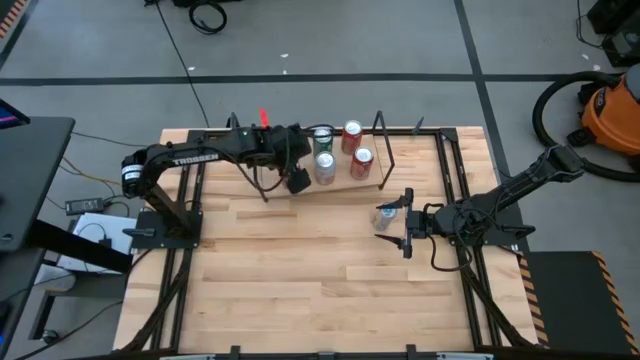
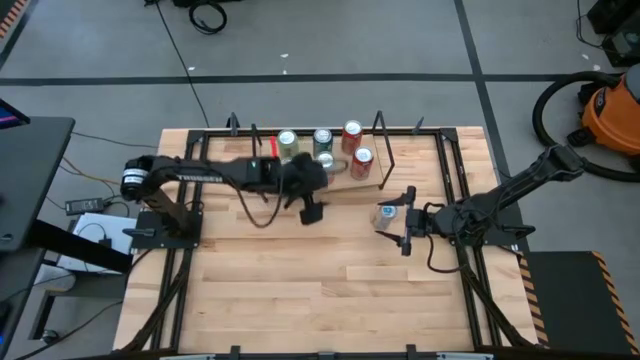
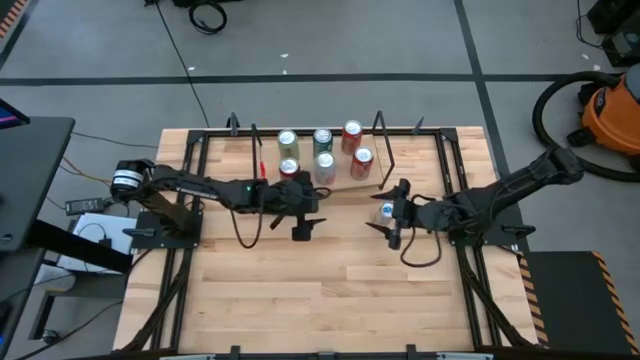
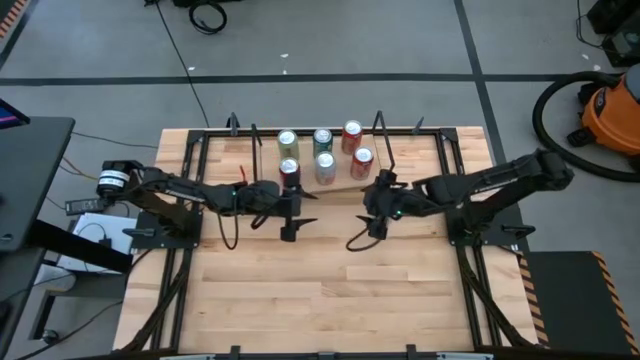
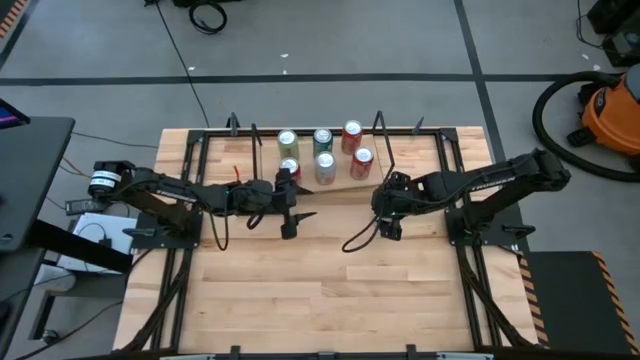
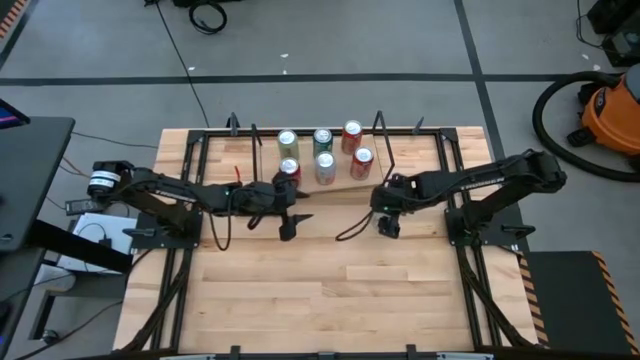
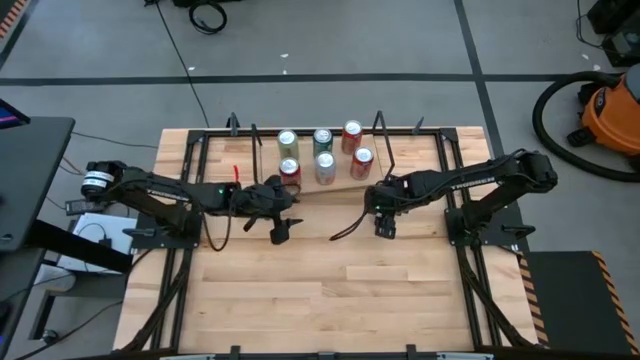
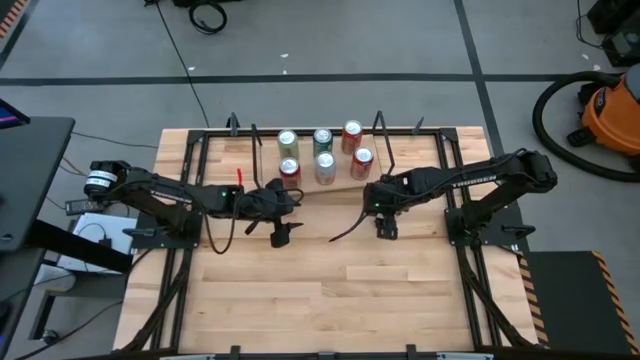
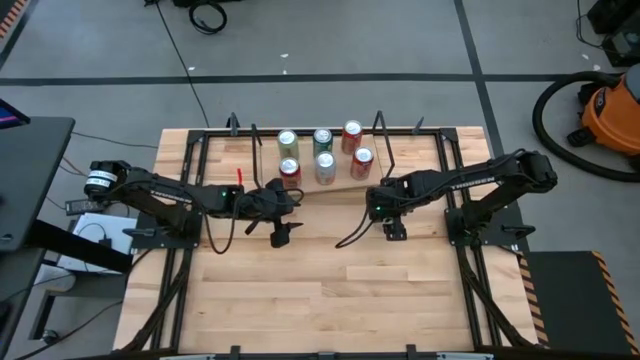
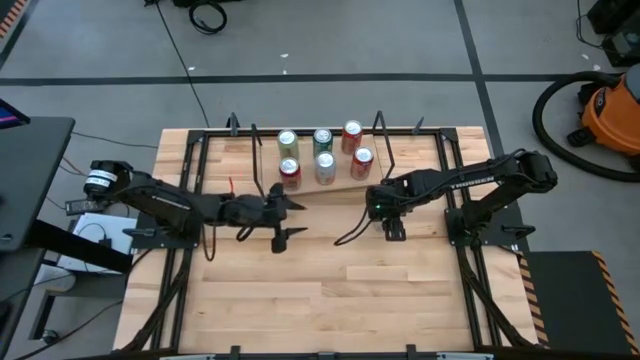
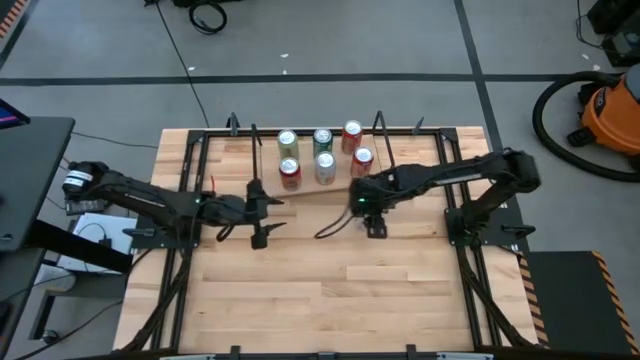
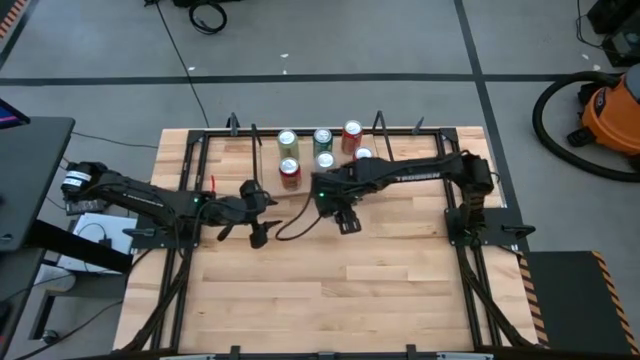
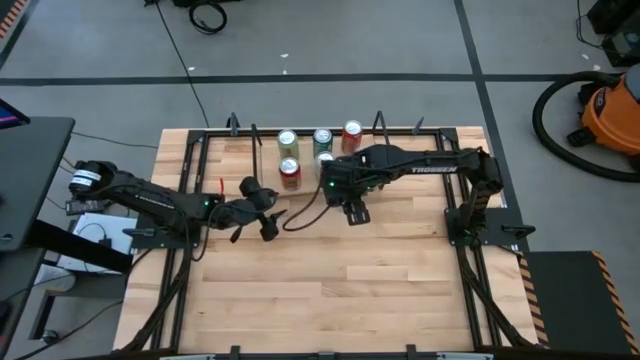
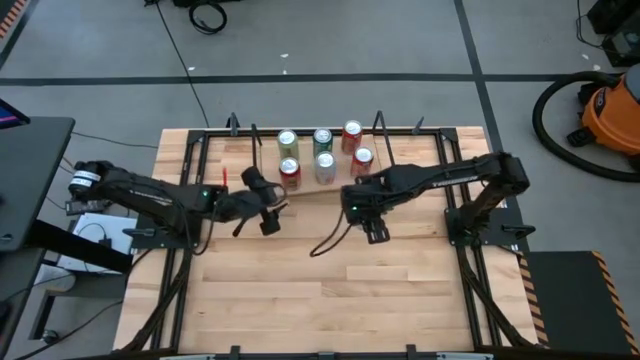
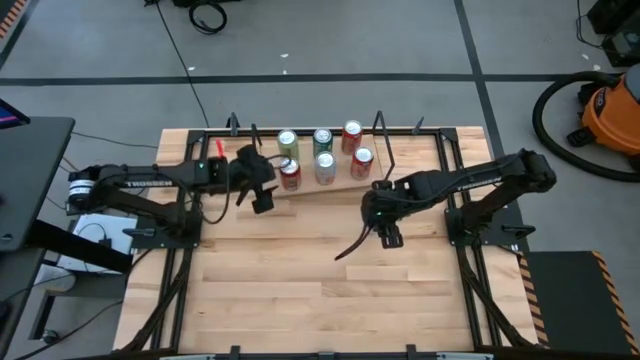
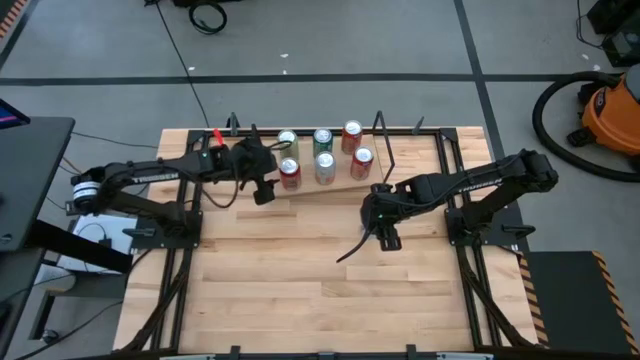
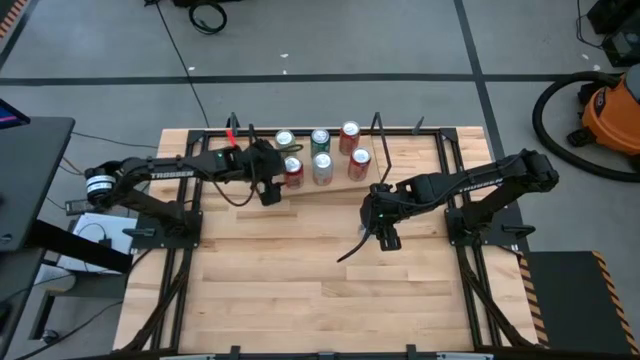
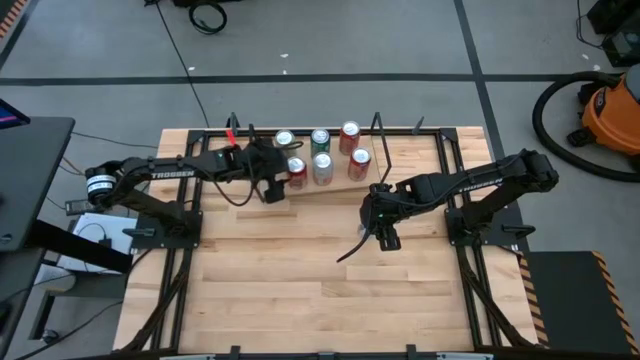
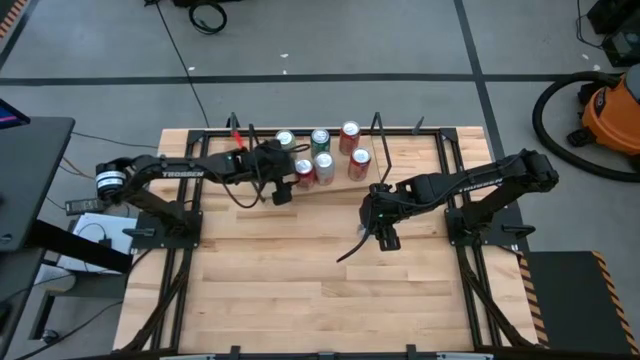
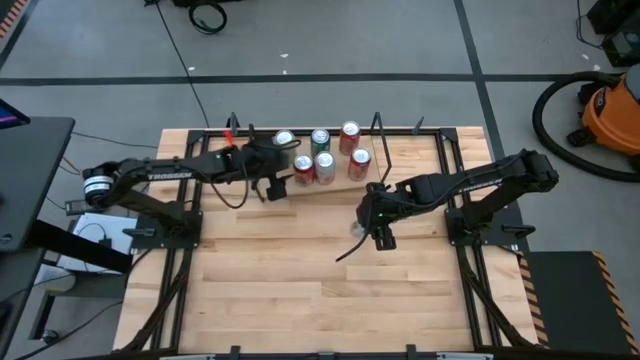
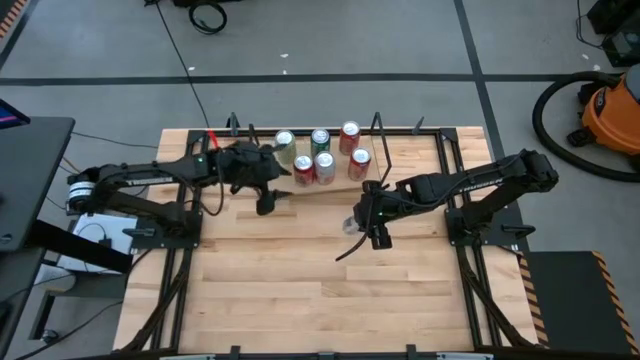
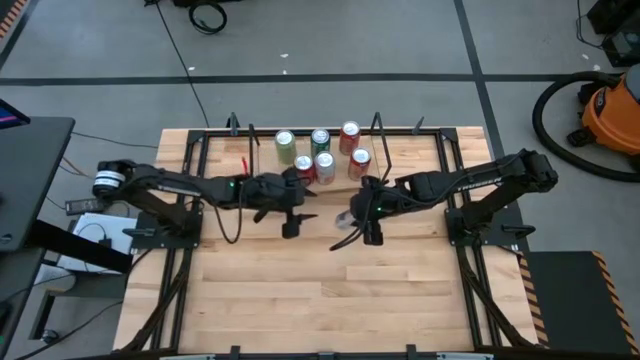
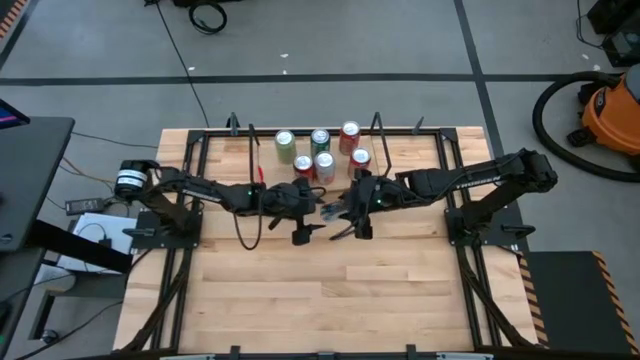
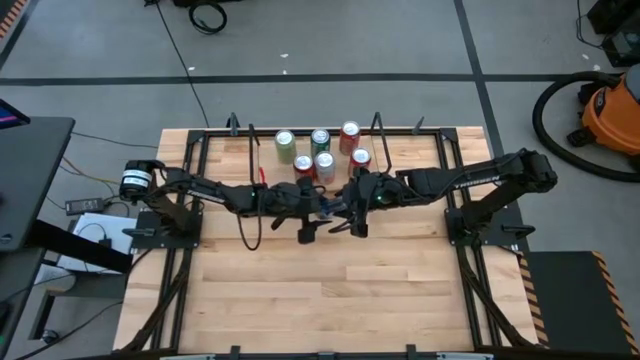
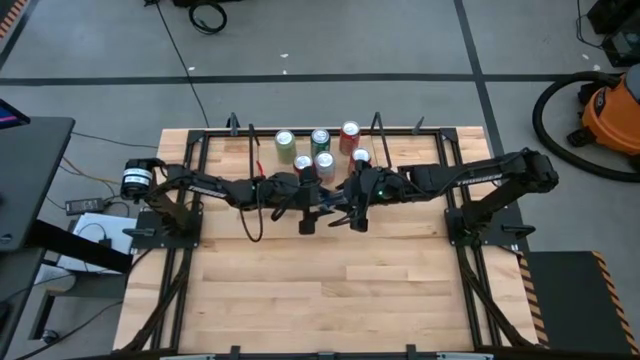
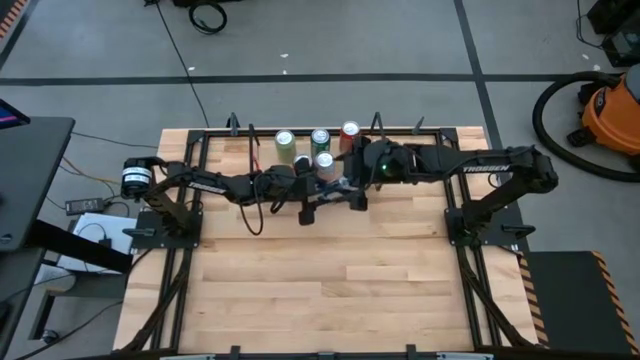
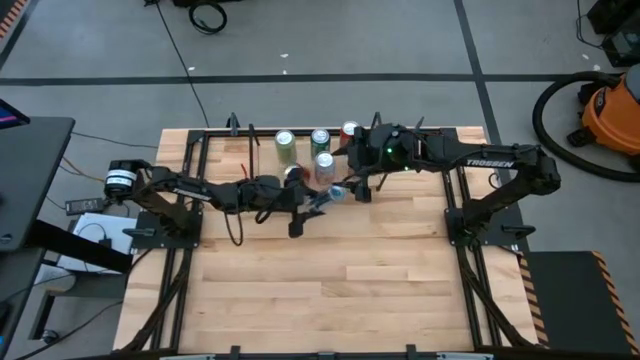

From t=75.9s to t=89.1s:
Task: Place canned beverage on shelf
Put the blue soda can on the shelf

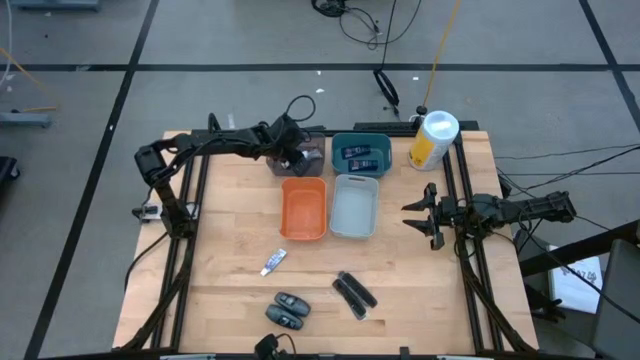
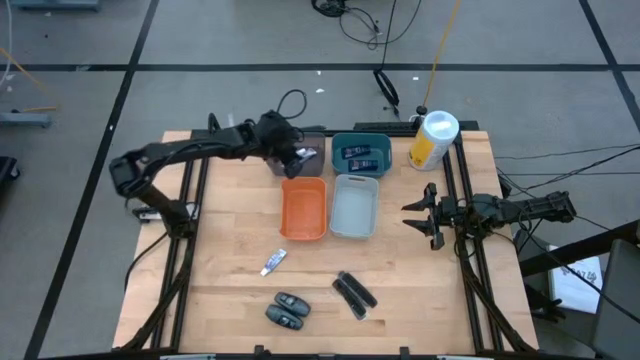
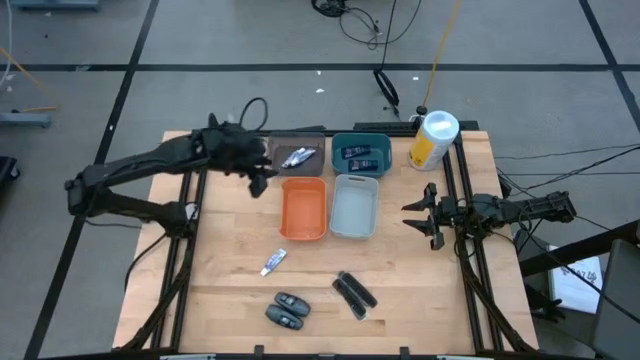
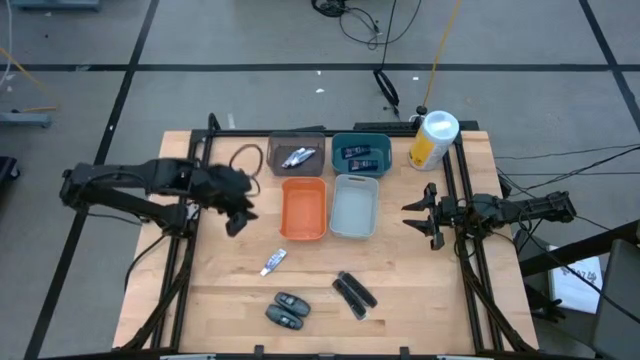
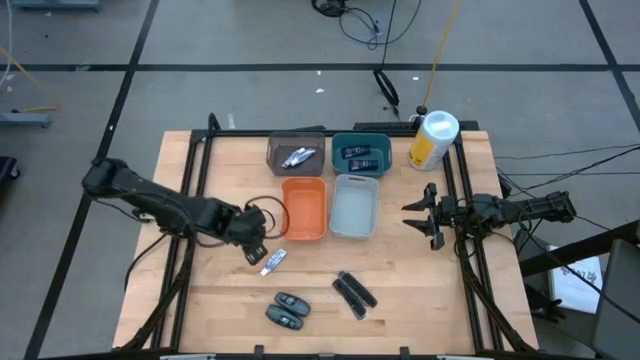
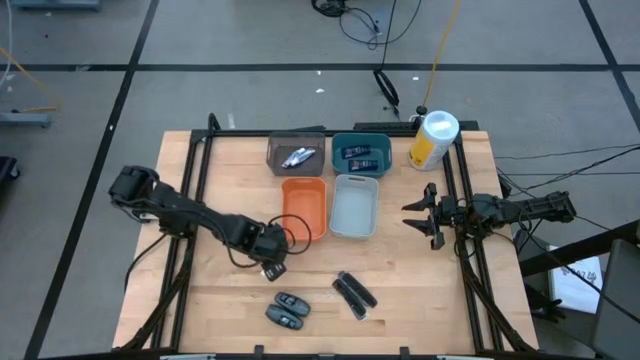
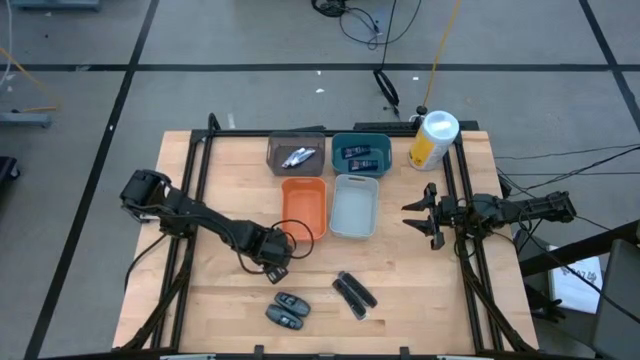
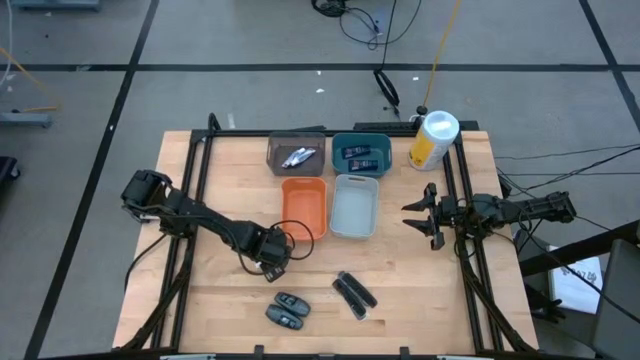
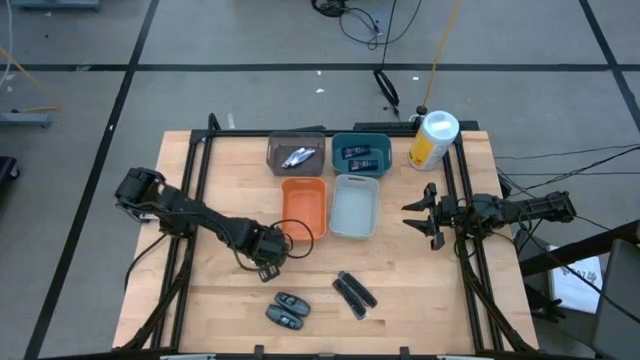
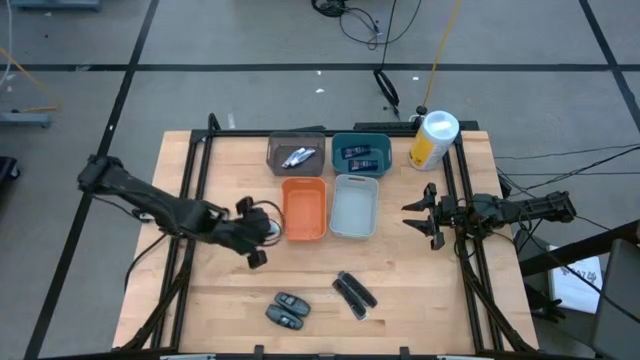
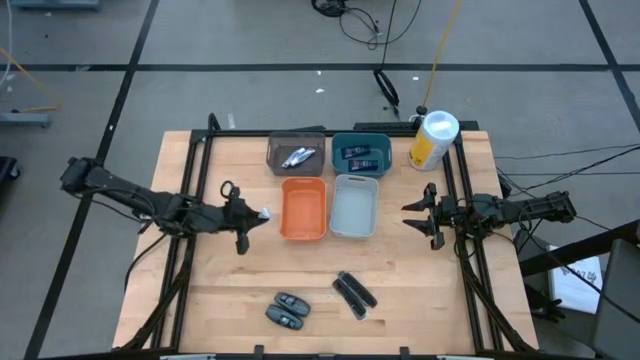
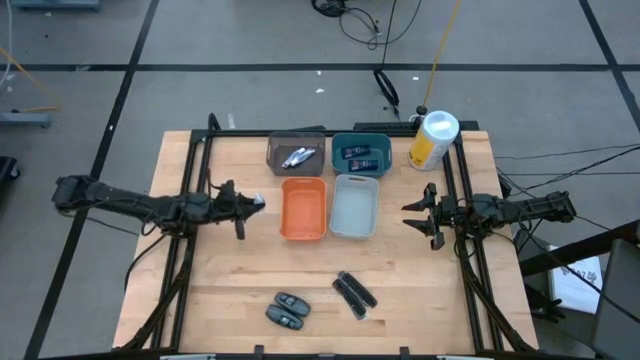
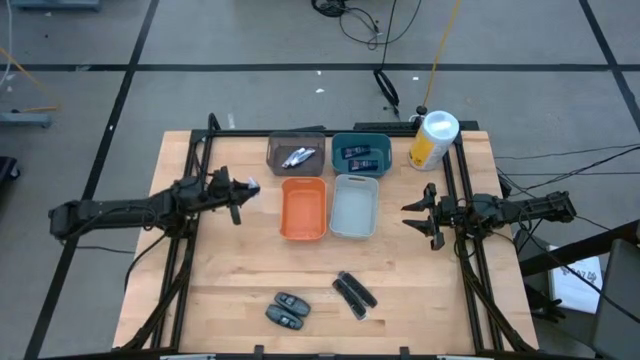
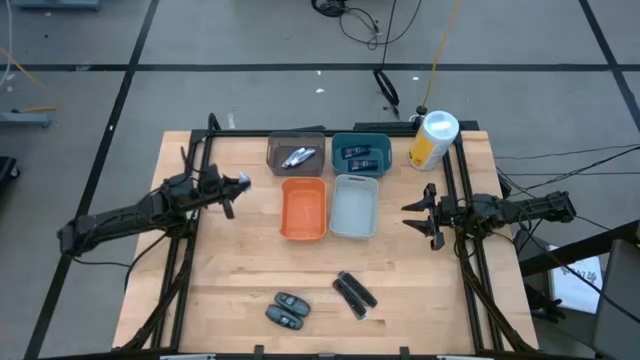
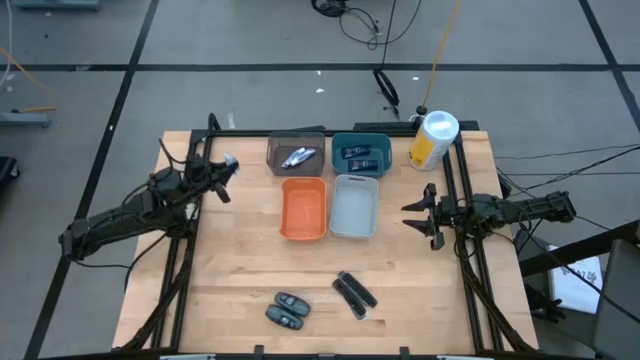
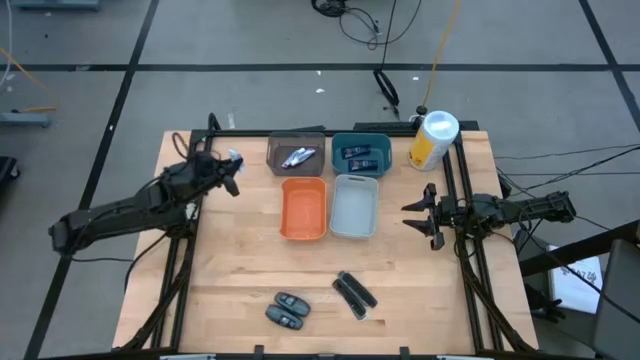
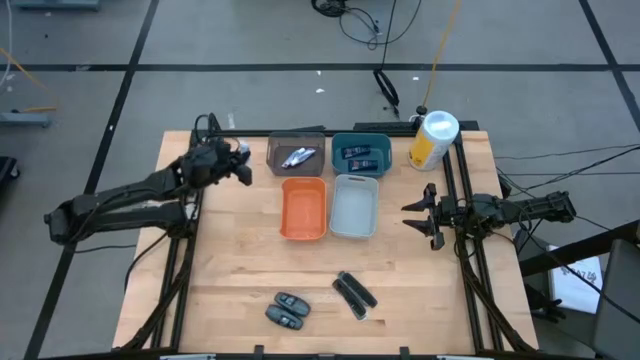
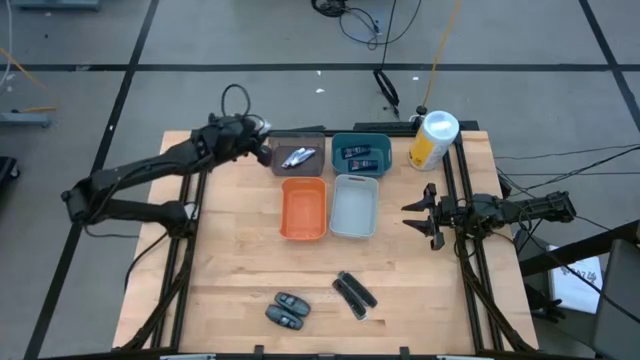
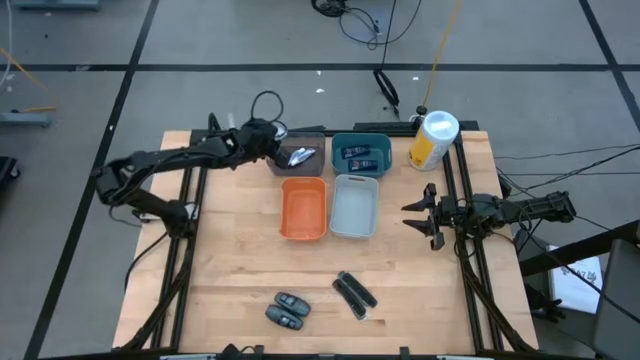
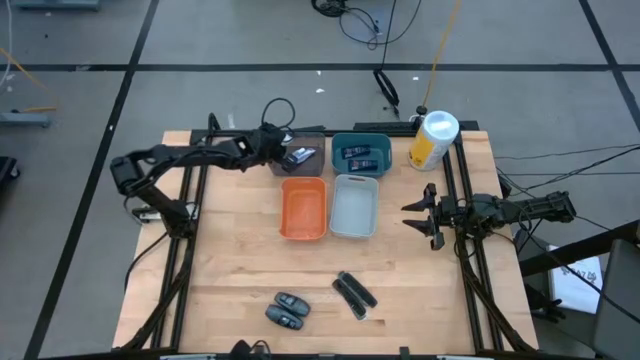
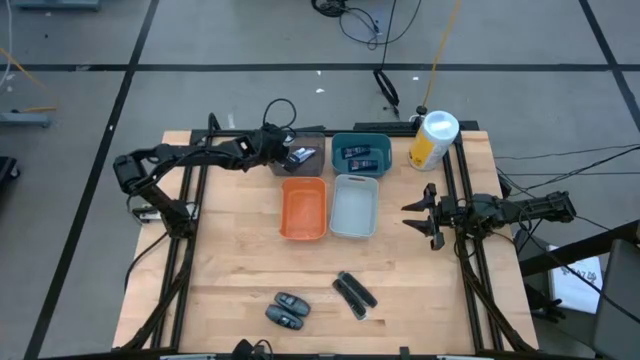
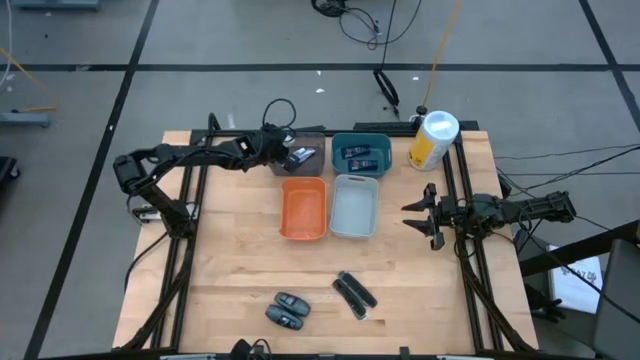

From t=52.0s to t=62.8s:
Task: Pick & Place Travel size toiletries
Put the white toothpaste into the black transparent bin
